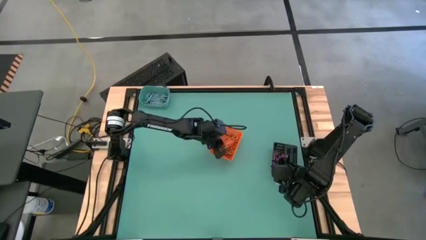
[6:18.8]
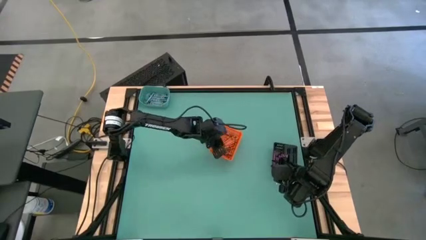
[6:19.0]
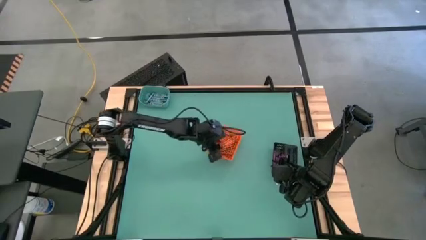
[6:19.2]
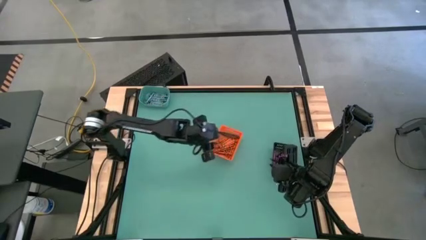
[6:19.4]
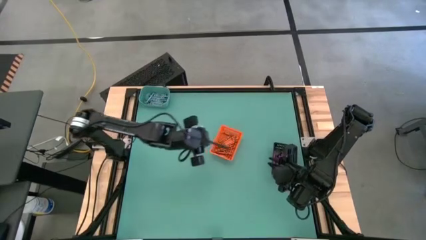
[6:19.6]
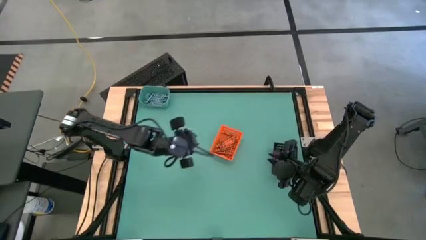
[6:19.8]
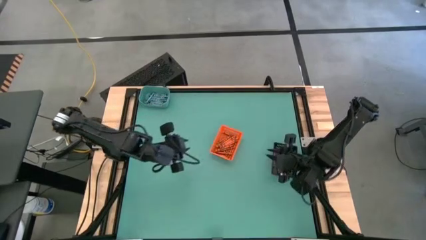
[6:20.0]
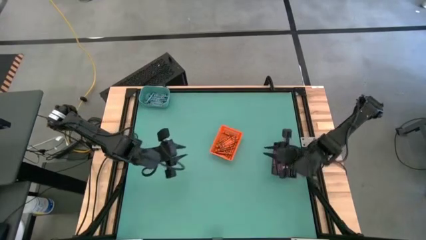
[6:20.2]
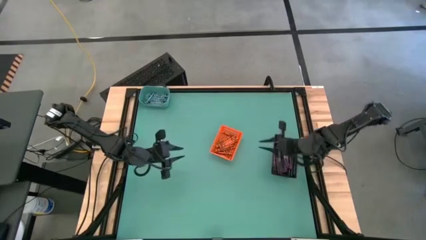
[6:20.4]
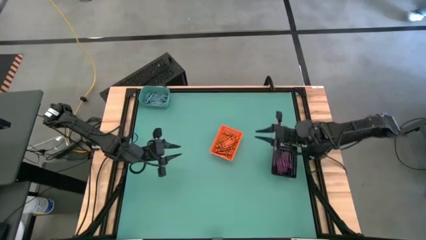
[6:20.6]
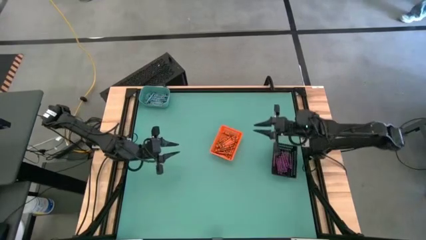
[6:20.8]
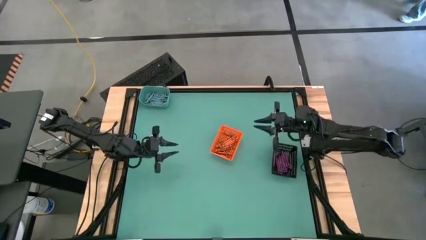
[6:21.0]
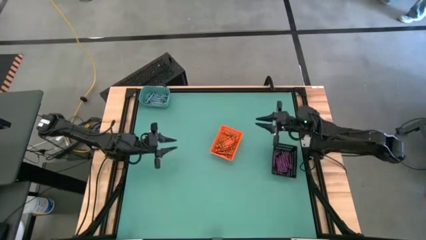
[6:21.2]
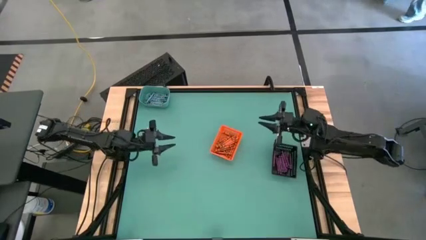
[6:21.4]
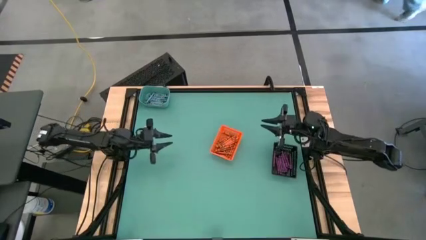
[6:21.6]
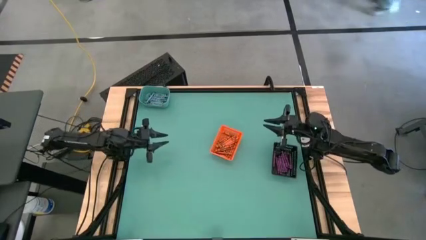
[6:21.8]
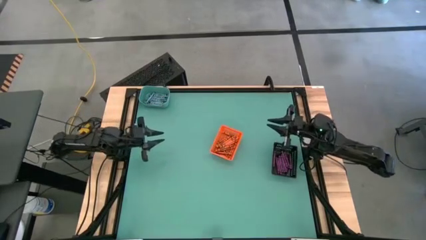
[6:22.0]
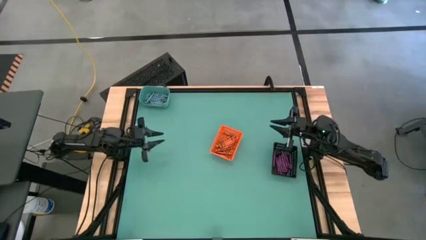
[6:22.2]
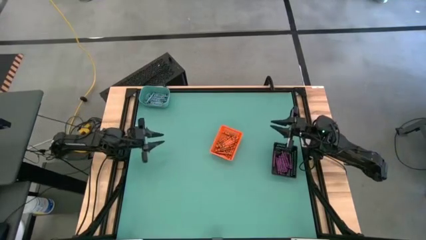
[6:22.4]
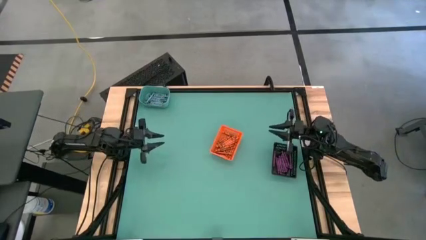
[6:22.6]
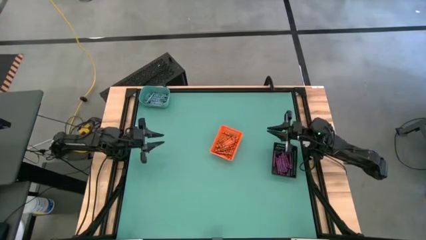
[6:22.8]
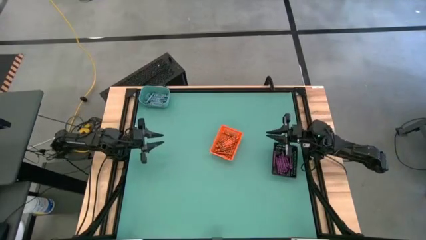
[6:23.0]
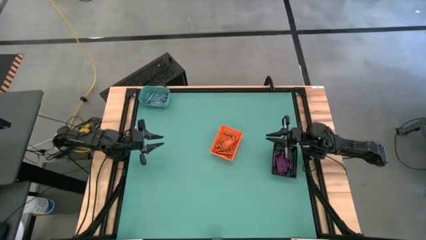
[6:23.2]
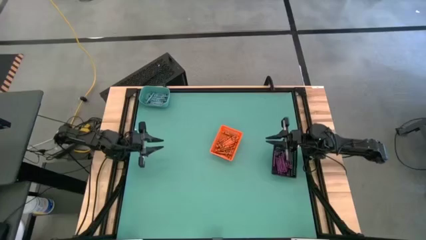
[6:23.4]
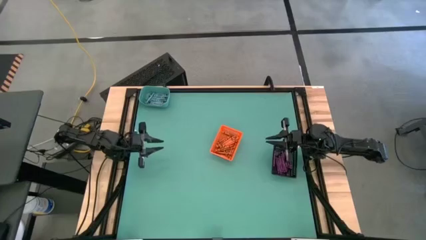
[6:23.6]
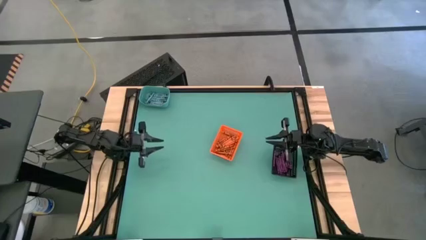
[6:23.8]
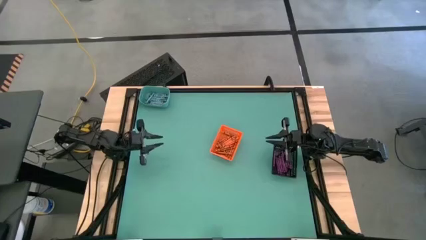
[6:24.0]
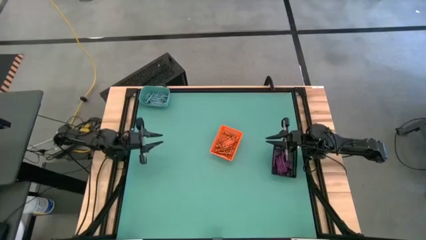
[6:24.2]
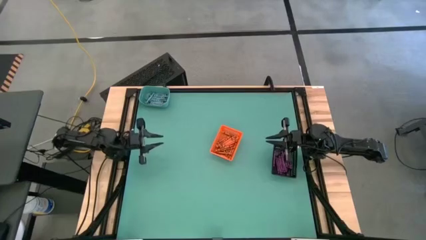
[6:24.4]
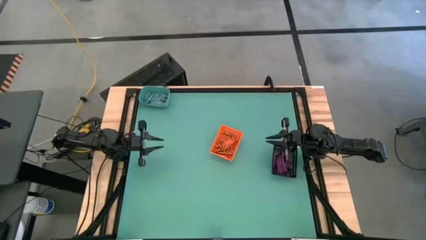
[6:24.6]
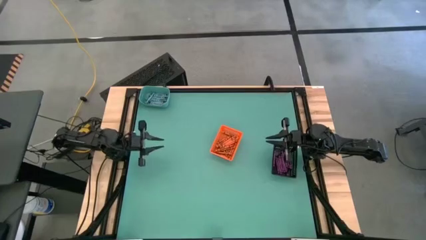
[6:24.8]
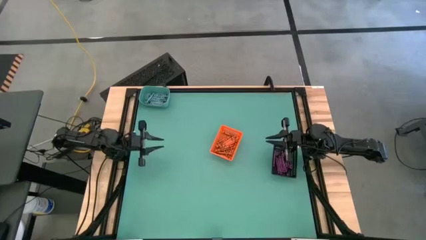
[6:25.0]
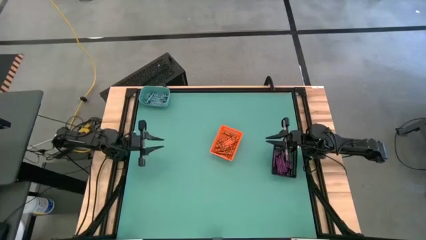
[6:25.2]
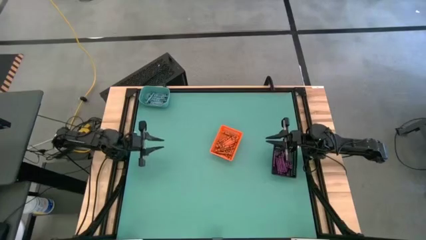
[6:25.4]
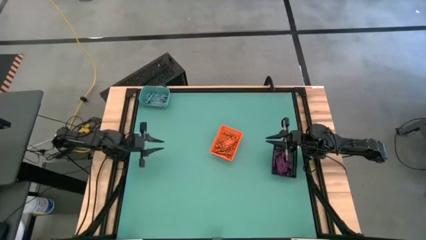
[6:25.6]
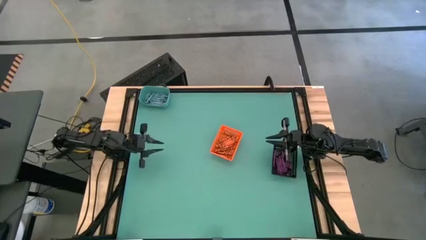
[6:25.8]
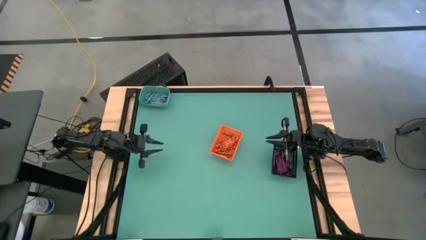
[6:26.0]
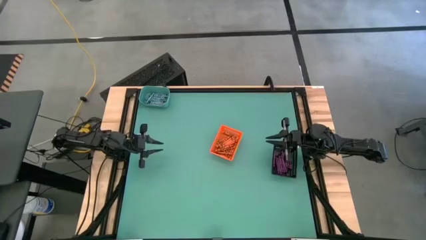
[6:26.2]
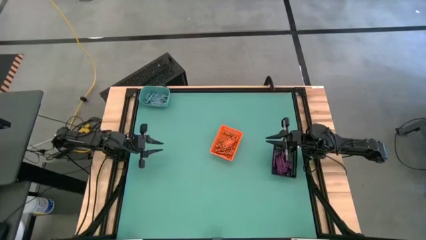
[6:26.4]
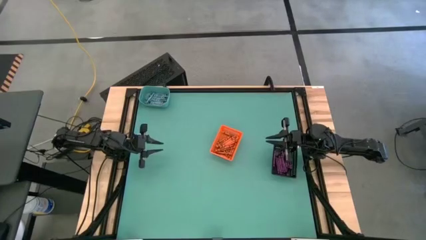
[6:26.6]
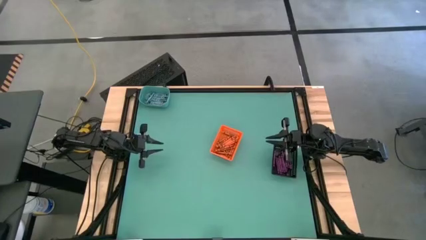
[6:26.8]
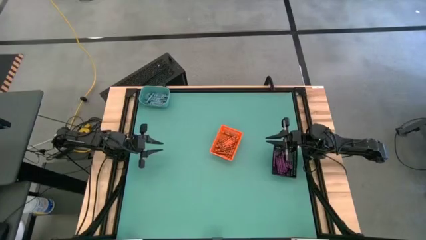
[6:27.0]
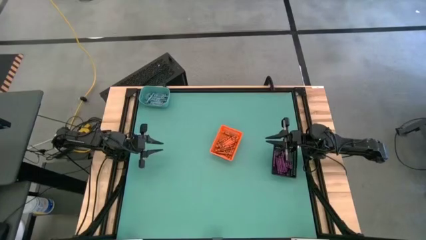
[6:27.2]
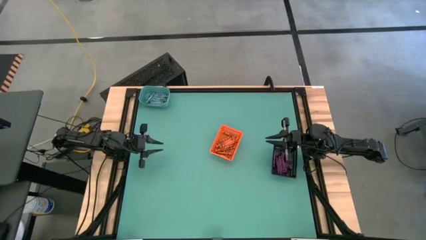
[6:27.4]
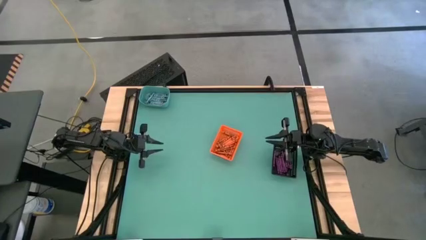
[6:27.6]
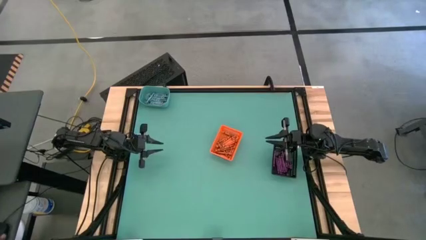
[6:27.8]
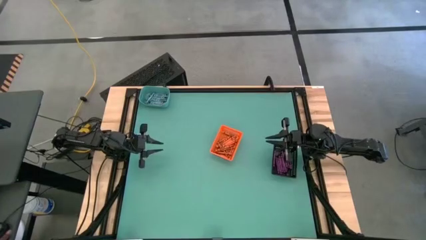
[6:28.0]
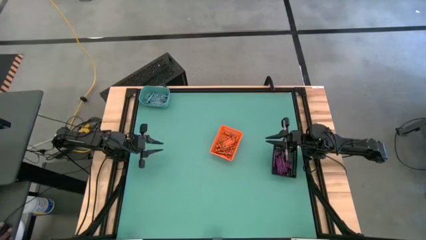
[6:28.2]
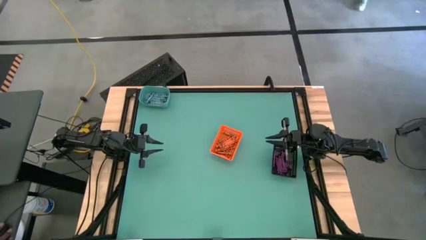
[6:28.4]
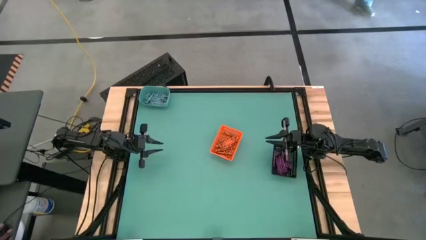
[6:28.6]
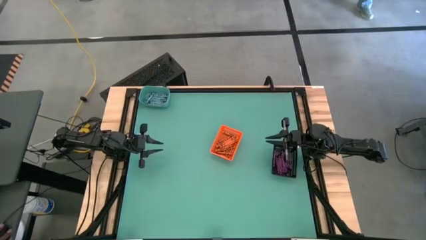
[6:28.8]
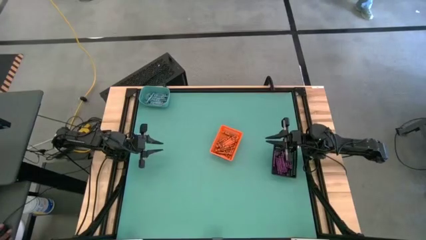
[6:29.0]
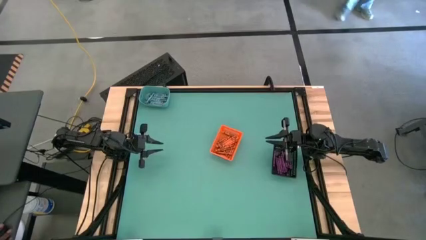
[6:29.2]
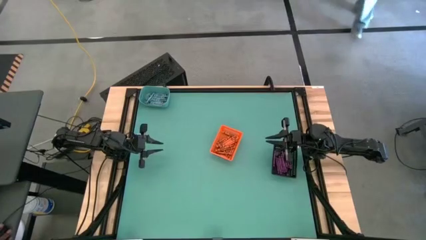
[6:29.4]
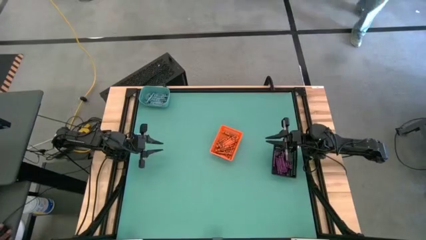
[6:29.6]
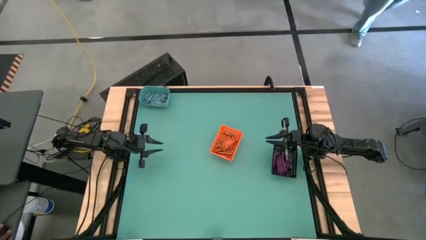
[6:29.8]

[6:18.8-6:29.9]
Task: Sort crayons
Return to Home Position

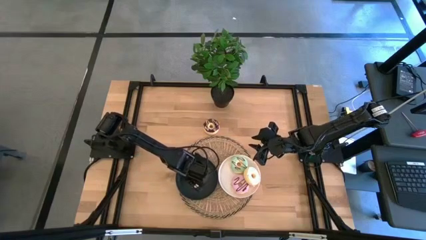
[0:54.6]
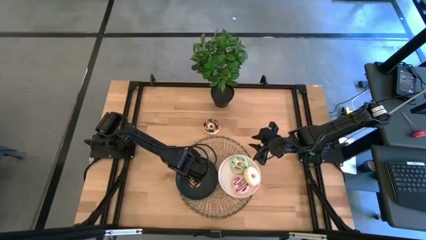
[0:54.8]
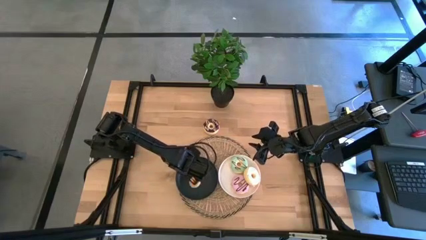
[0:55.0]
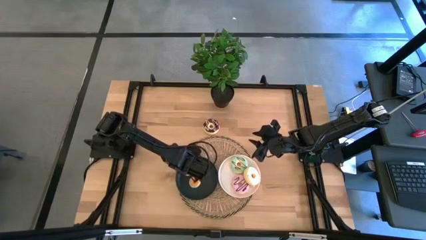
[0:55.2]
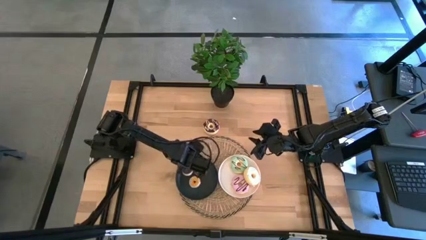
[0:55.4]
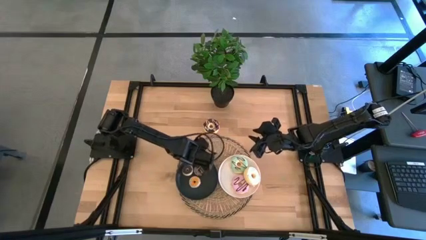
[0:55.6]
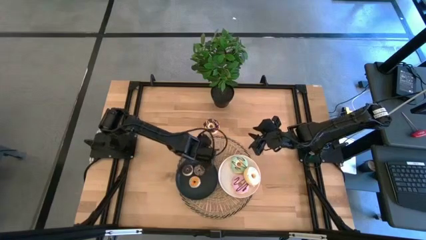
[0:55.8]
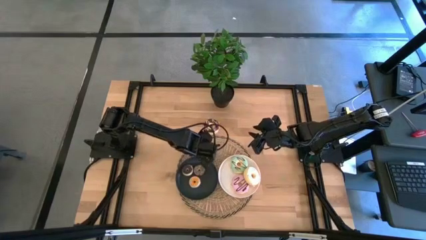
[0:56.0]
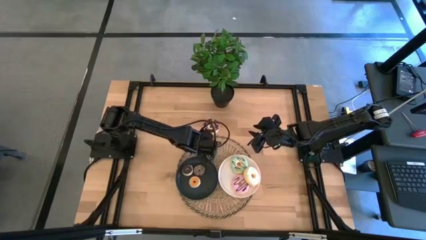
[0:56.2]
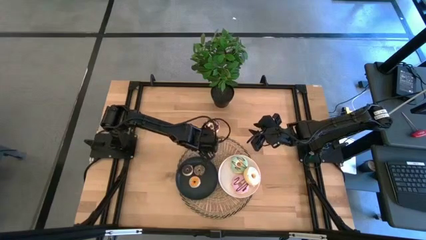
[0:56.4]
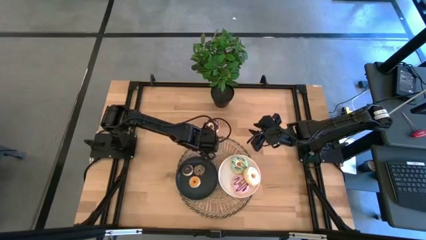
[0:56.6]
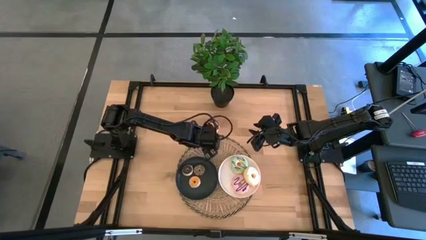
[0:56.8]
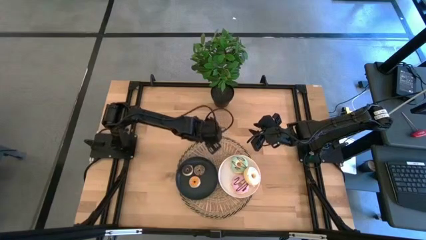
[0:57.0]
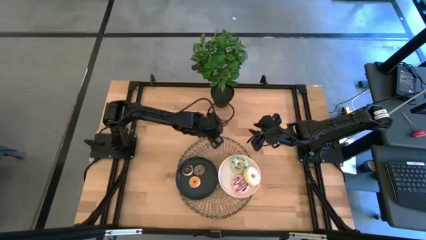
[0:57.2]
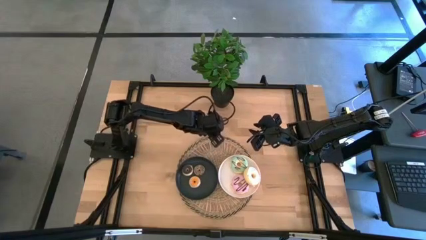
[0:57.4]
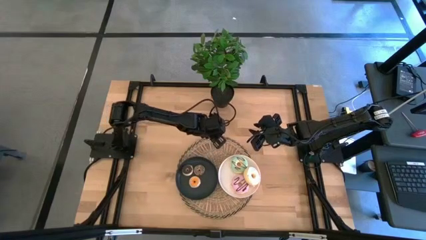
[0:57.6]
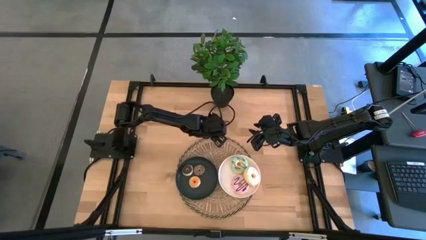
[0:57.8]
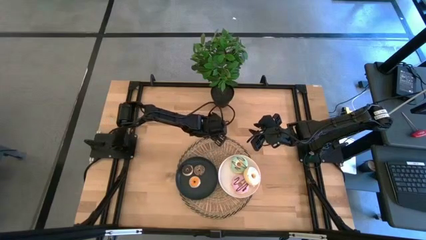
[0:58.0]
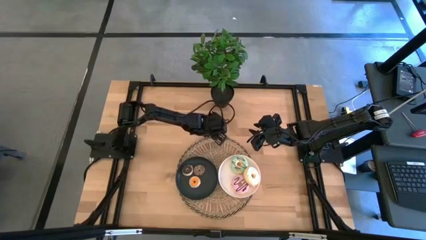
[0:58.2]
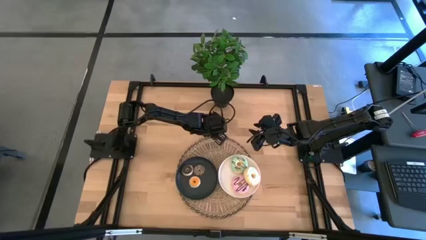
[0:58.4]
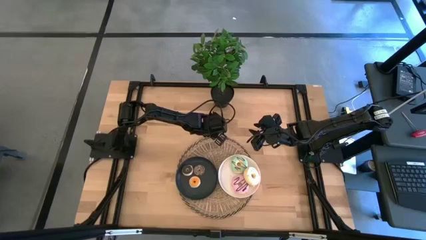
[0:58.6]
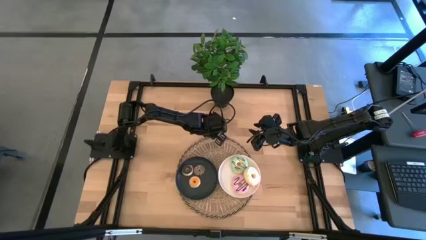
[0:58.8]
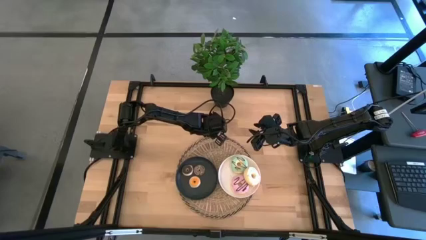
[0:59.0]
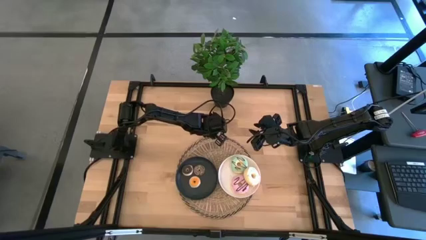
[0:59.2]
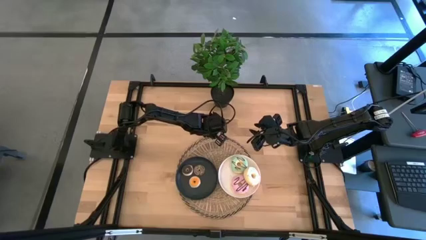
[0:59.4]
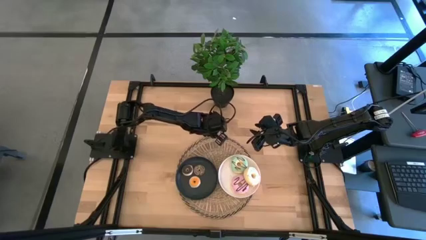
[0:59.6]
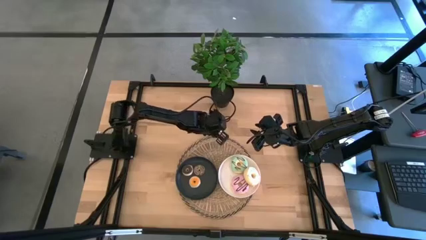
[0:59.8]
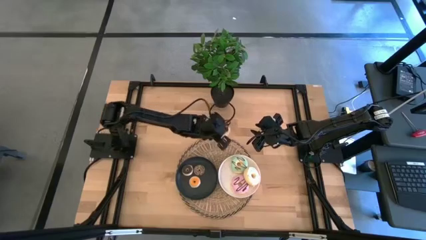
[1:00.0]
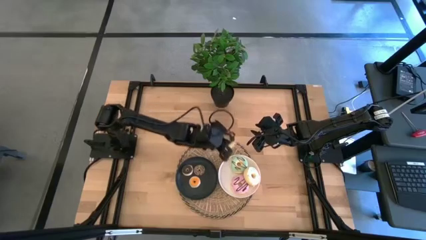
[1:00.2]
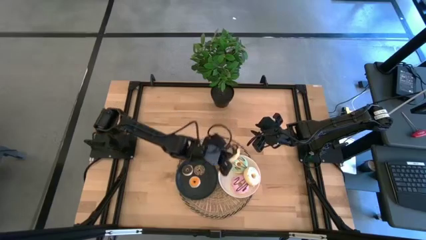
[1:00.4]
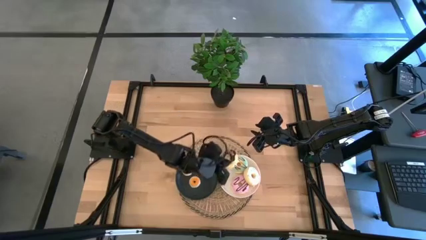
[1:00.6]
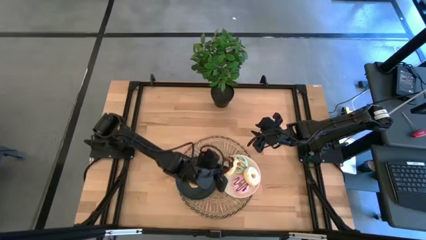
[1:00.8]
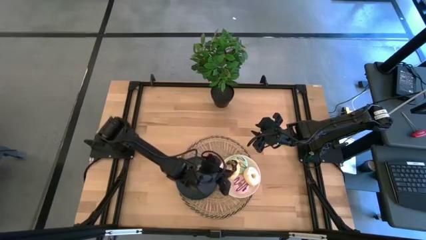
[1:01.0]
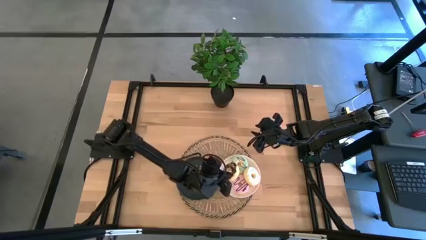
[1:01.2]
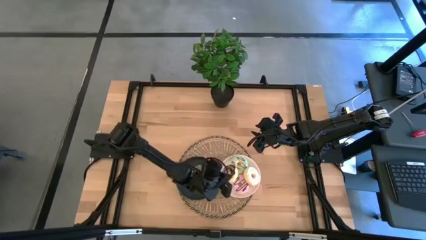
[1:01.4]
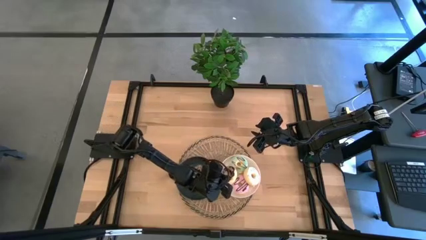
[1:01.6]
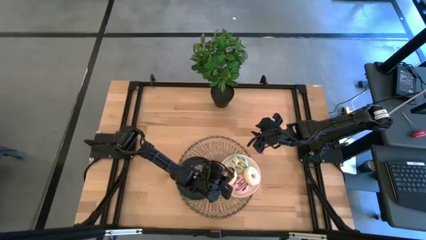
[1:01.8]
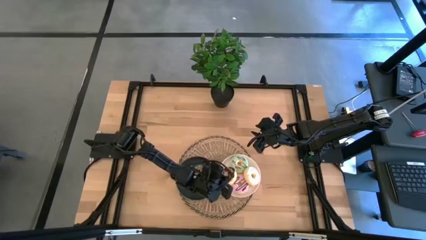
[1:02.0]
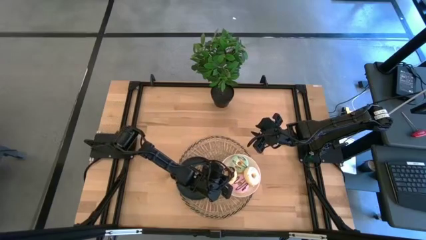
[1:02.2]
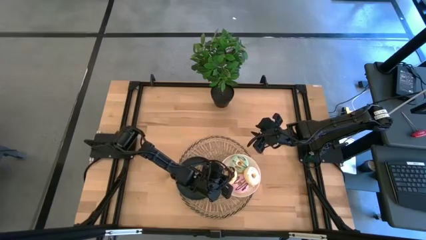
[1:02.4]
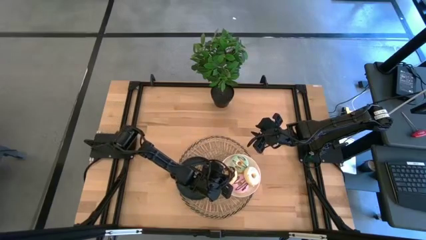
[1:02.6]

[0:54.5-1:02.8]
Task: Pick & Place donuts
Put the large black donut on the white plate
